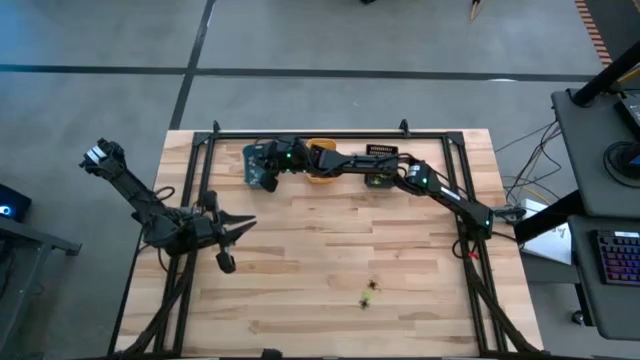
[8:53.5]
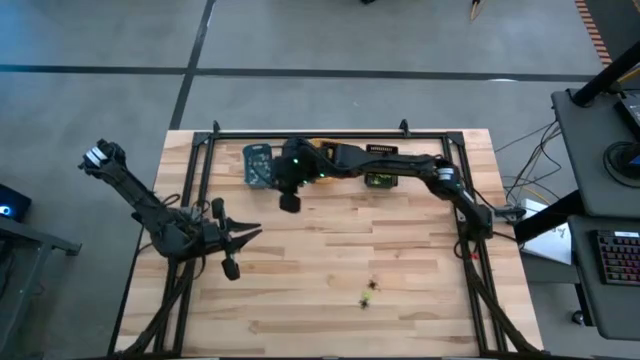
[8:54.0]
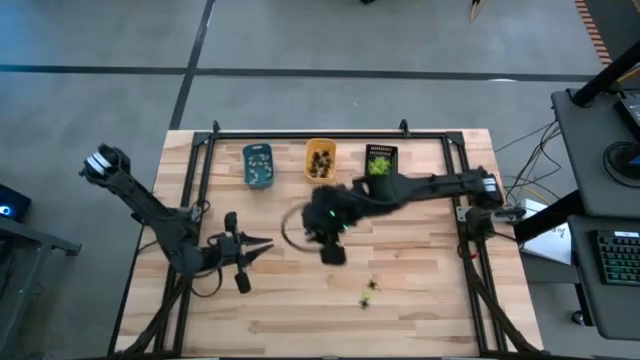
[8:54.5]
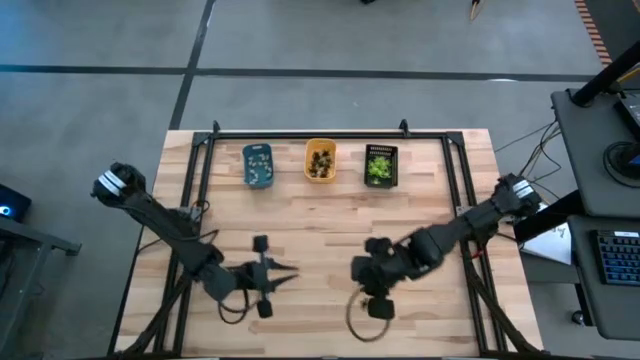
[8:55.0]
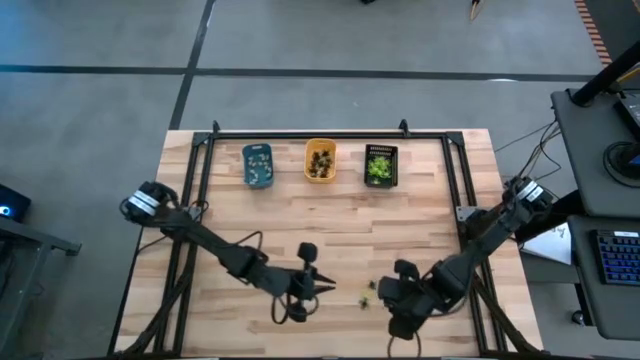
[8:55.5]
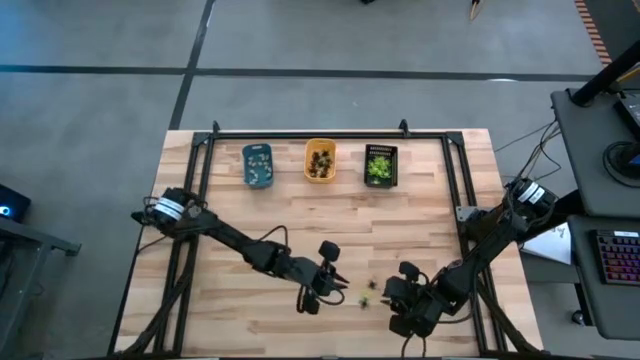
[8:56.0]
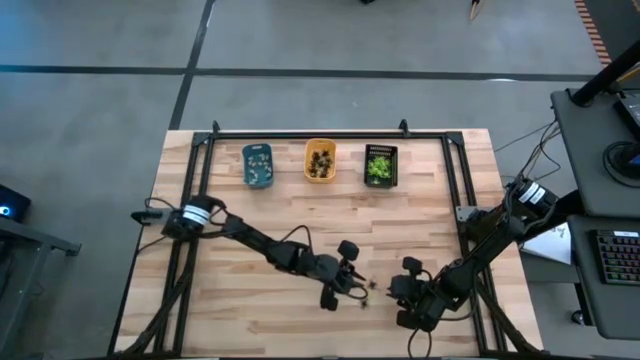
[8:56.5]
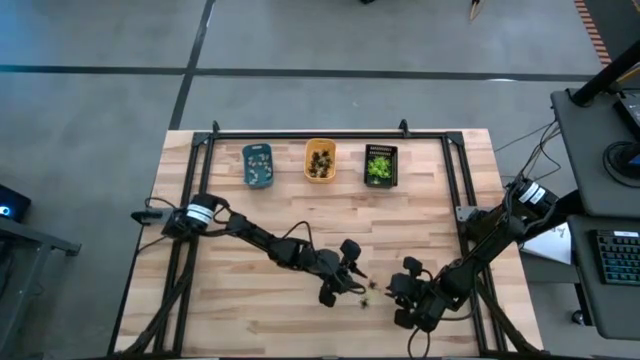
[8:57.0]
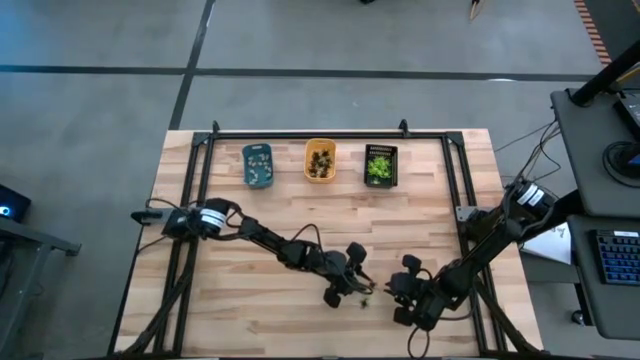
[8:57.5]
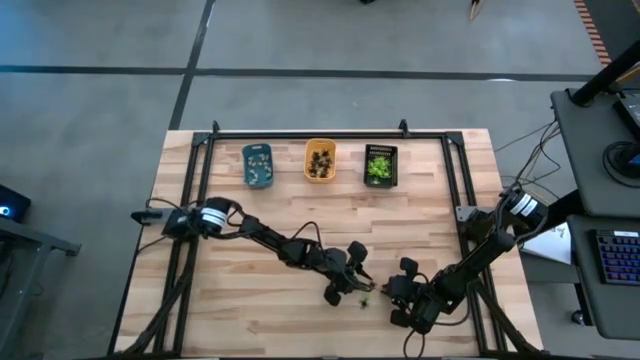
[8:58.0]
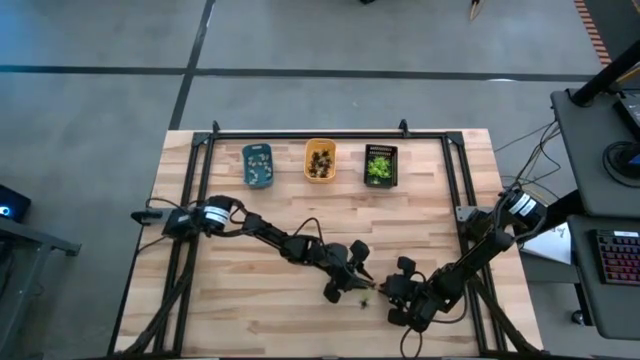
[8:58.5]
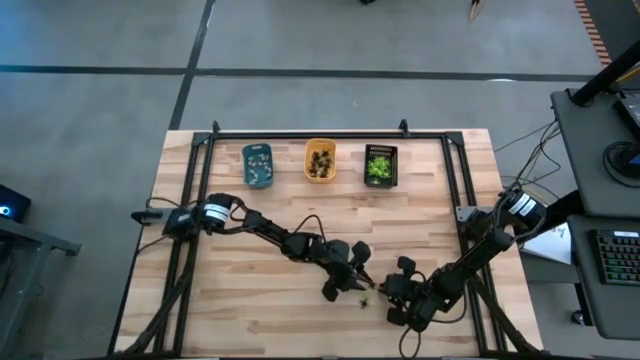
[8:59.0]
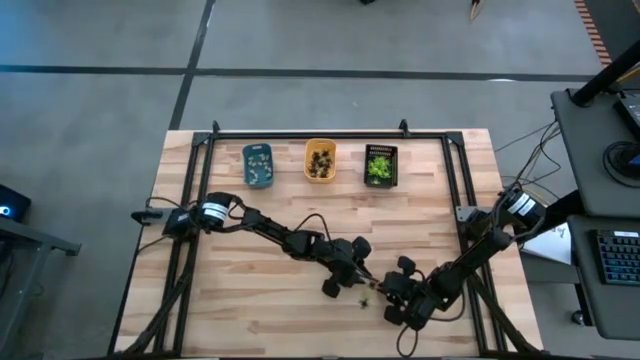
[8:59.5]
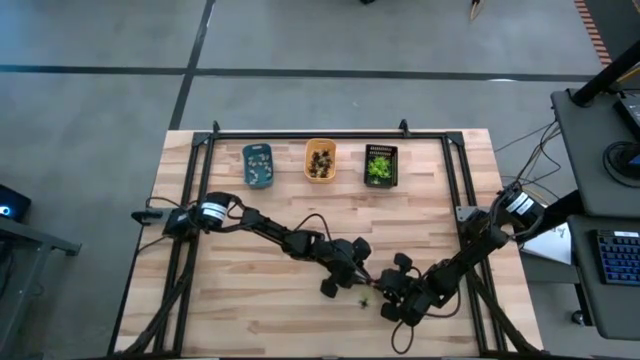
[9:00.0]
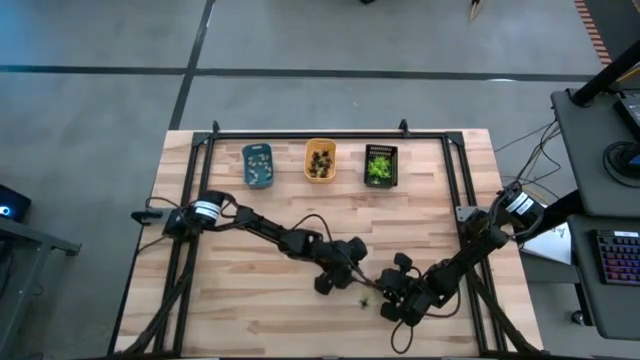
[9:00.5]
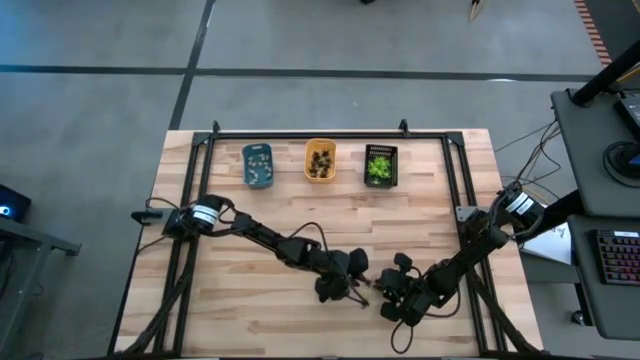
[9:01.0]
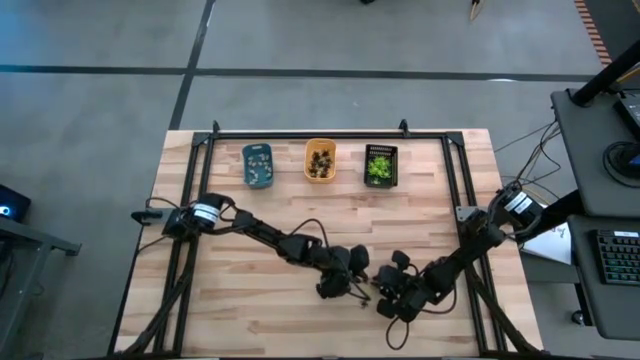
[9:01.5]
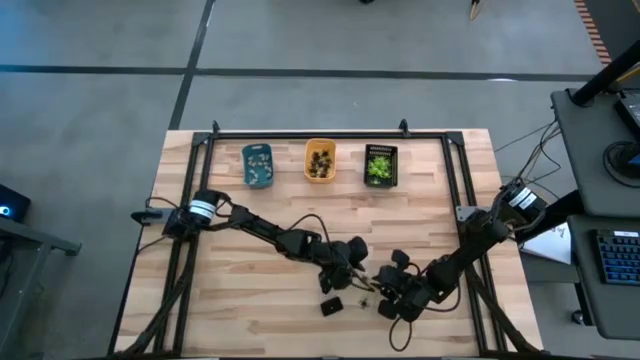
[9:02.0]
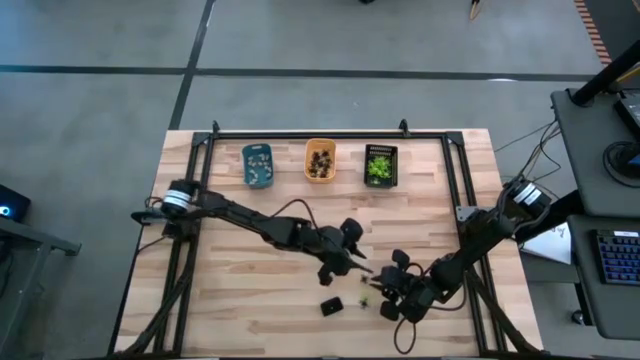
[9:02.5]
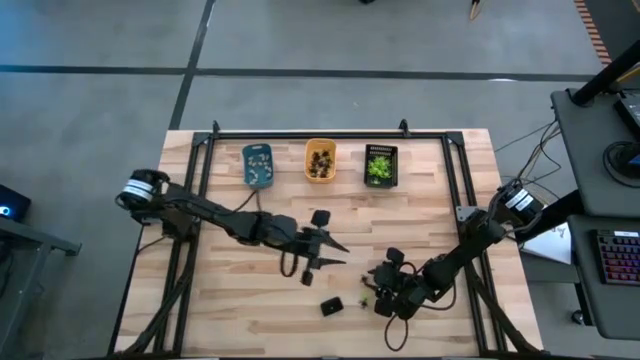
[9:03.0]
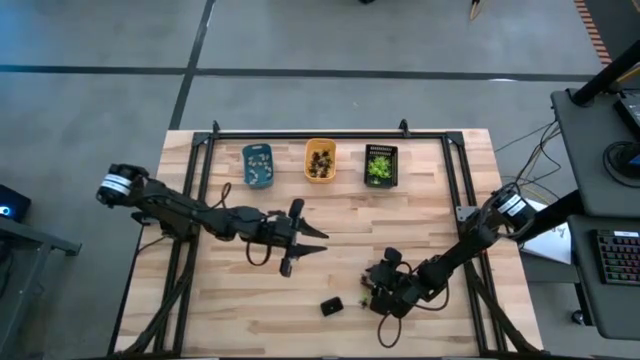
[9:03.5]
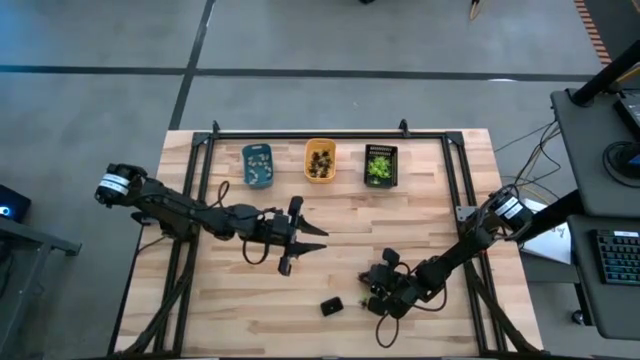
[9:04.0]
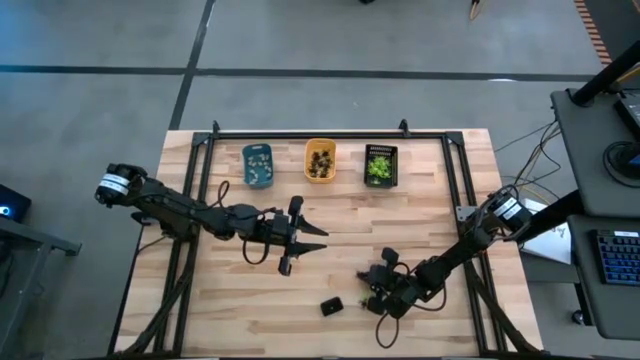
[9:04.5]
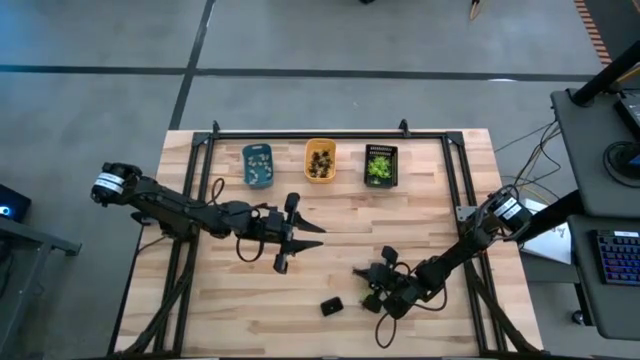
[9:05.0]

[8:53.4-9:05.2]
Task: Sort Halloween decoration
Put the black spider toy into the orange bin

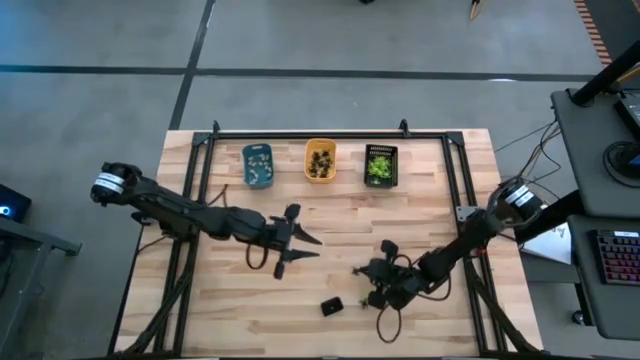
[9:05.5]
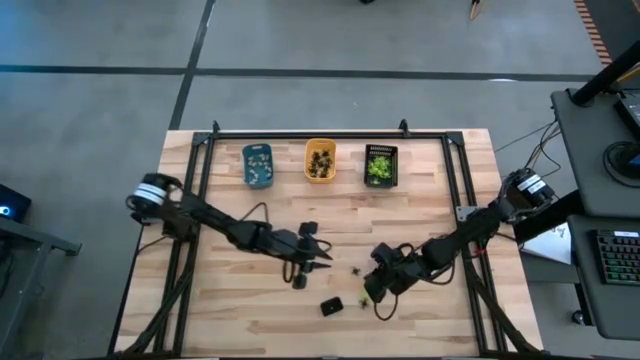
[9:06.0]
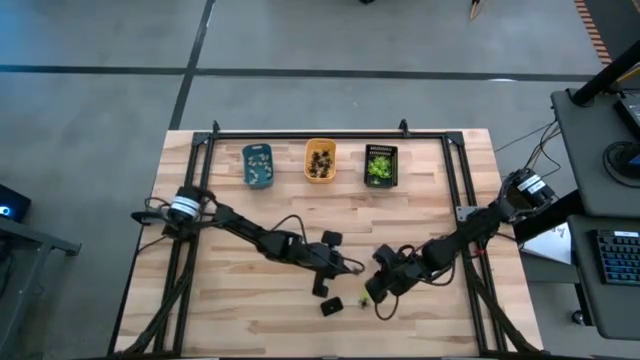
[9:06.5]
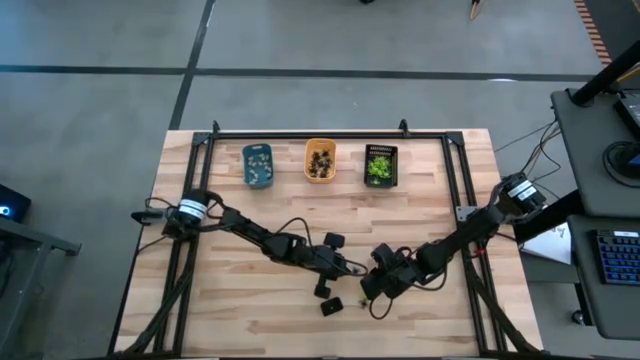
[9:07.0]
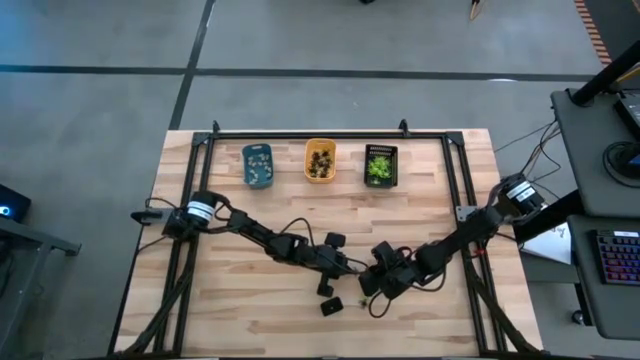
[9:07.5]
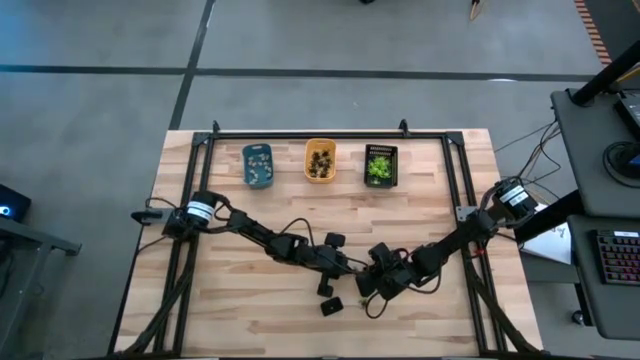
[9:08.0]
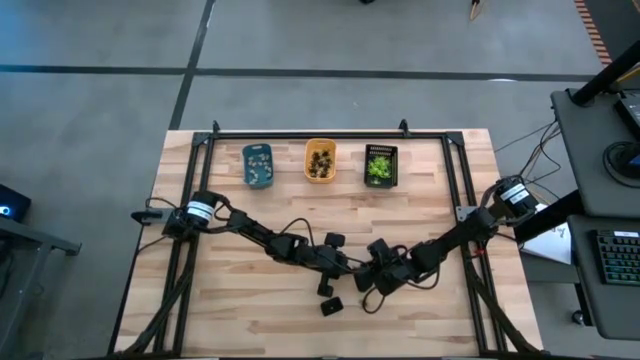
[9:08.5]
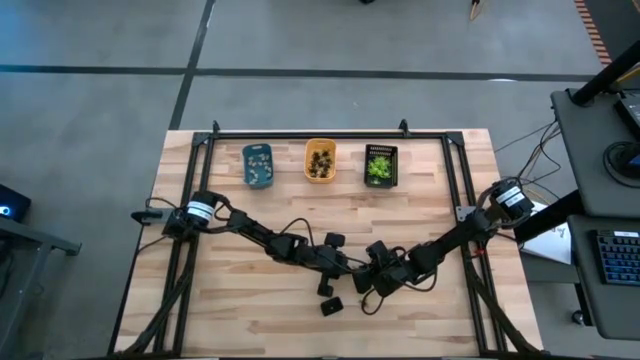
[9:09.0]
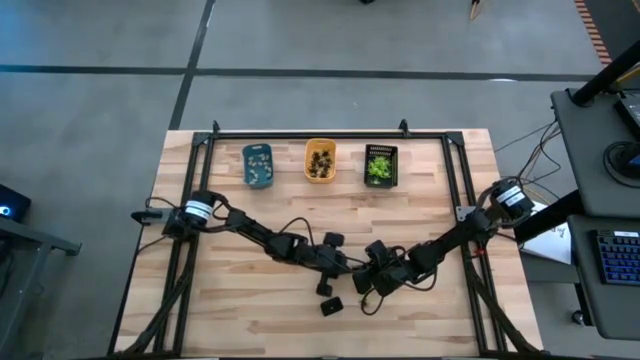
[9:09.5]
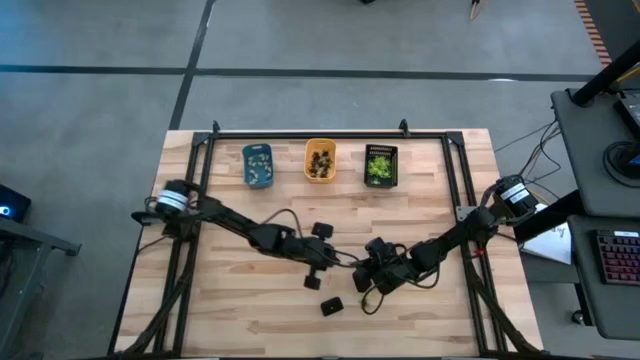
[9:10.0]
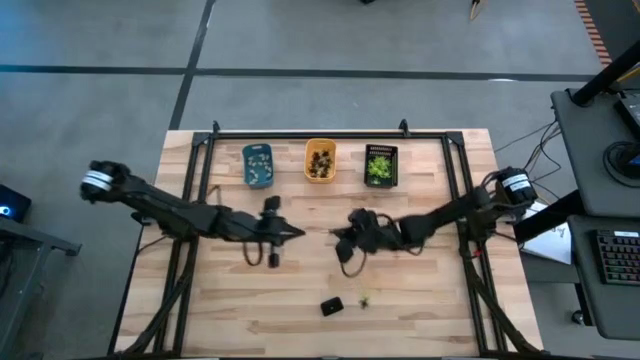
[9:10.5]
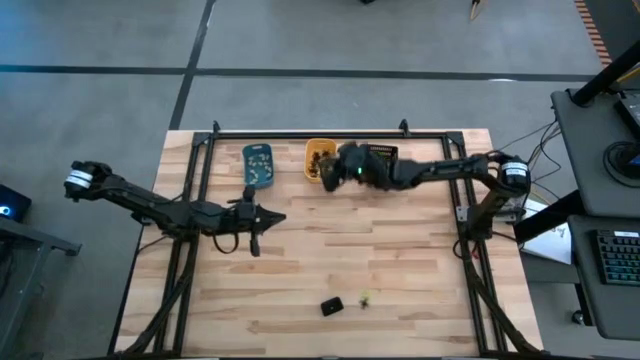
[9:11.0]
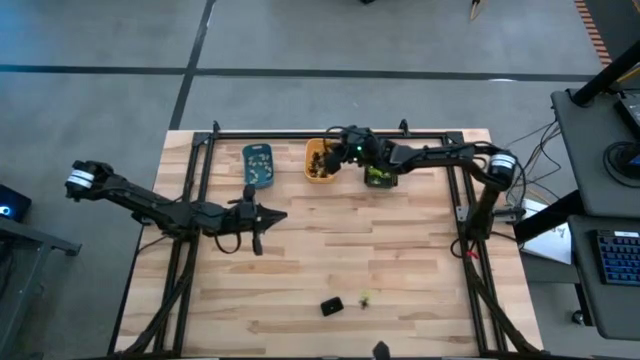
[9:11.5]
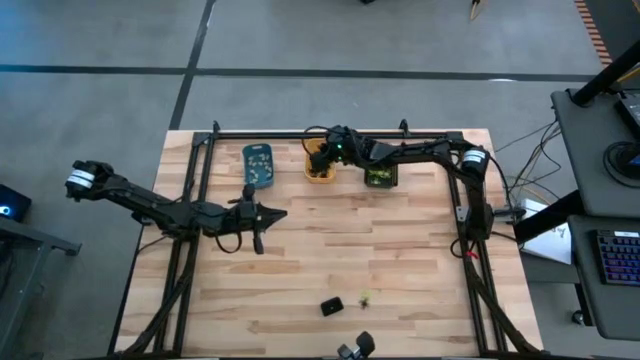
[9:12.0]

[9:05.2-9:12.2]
Put the black spider toy into the orange bin
